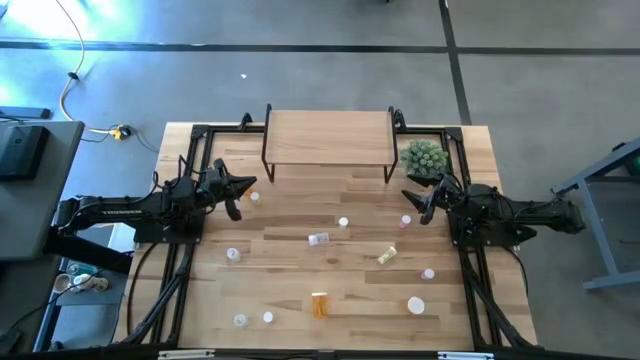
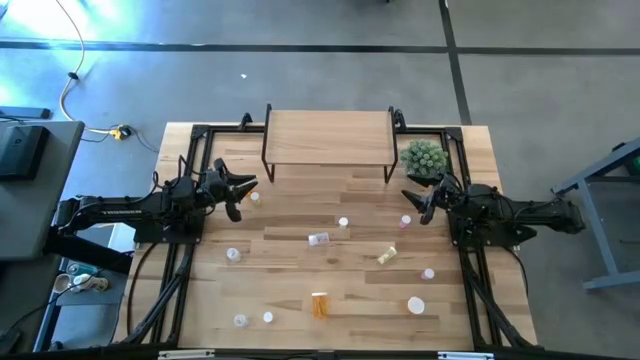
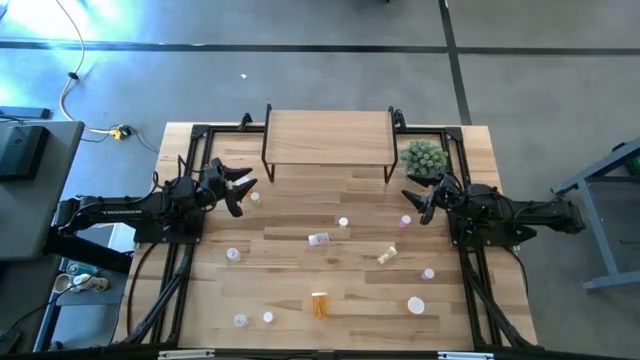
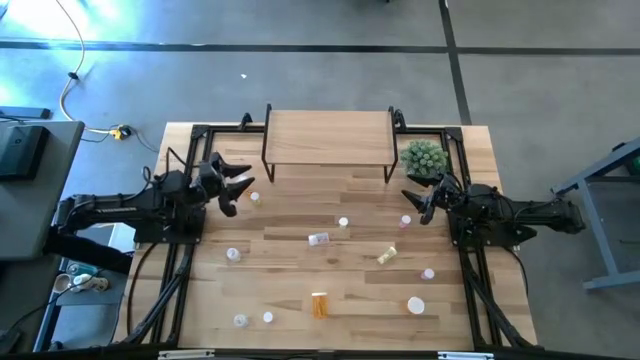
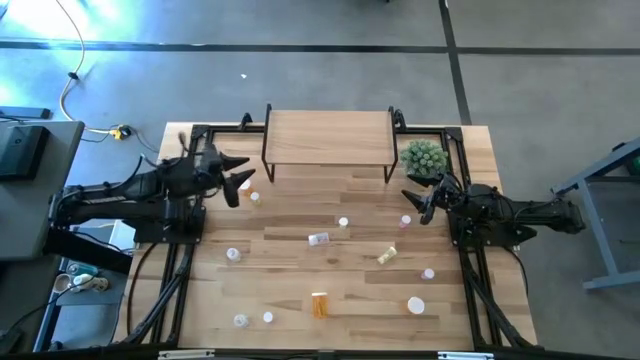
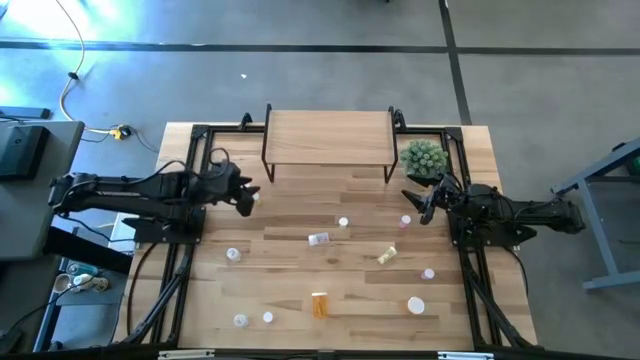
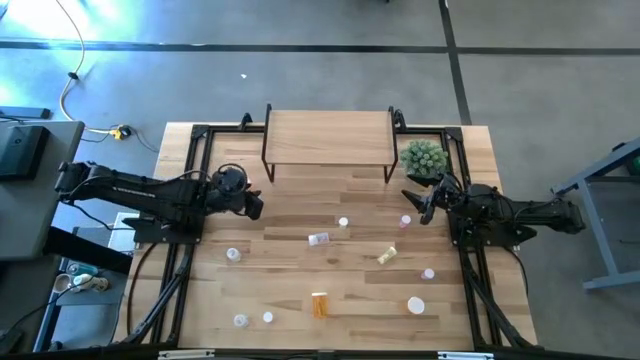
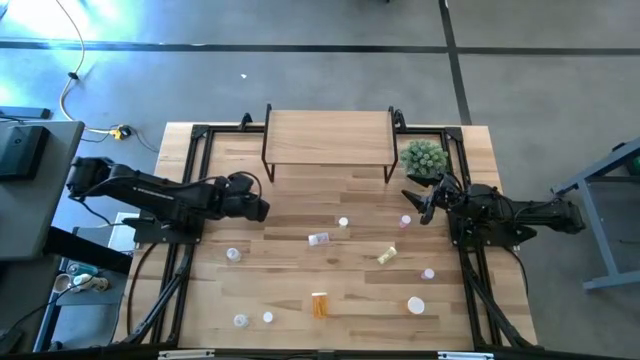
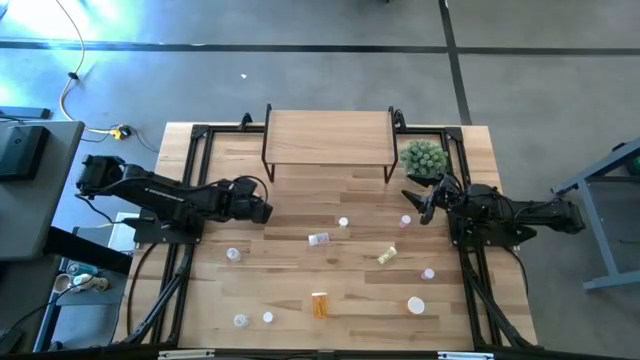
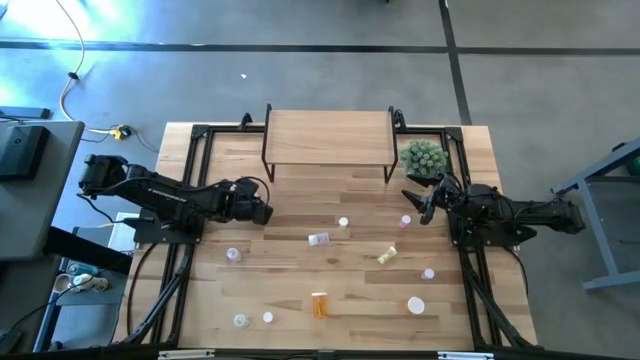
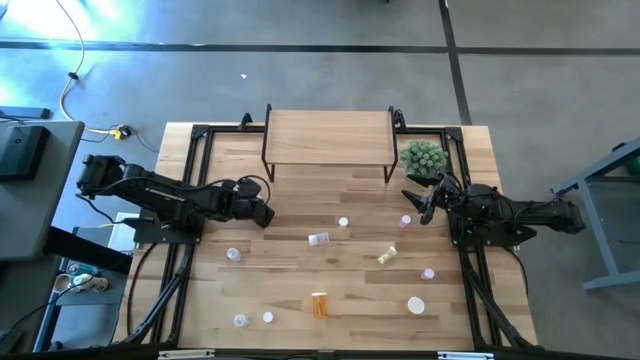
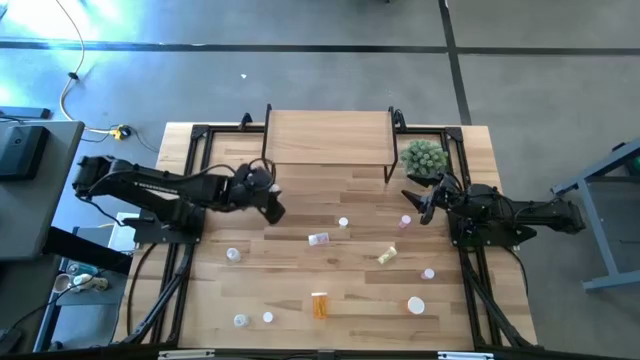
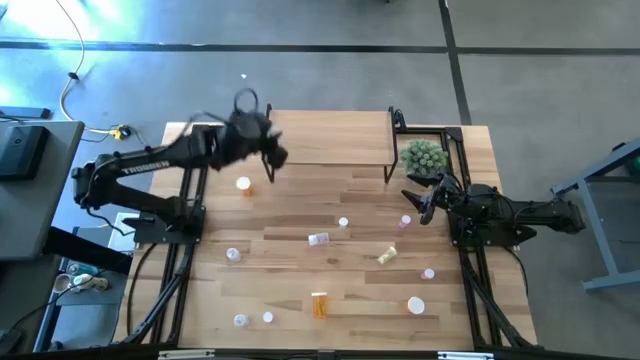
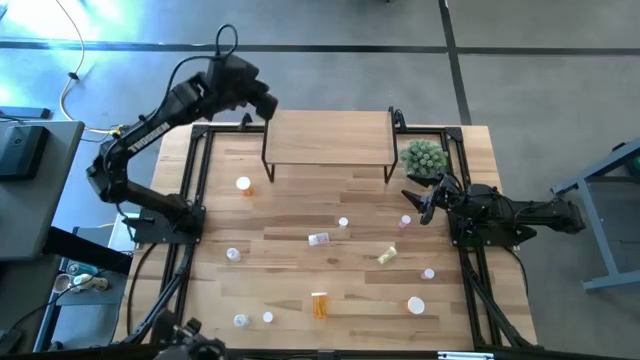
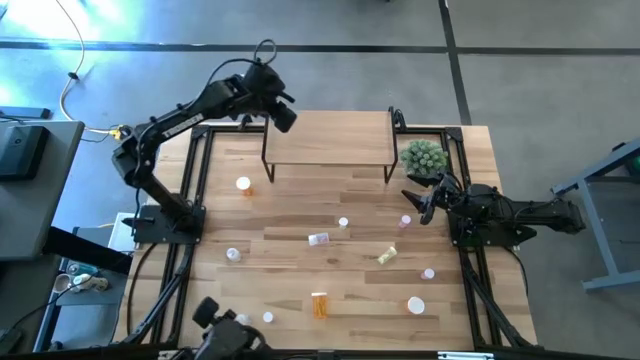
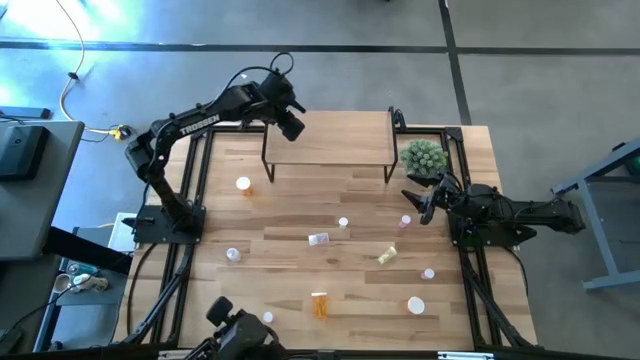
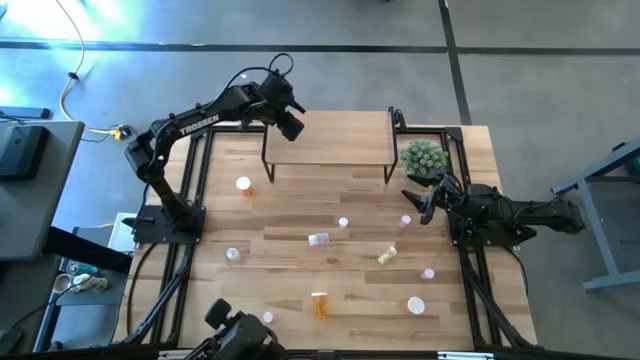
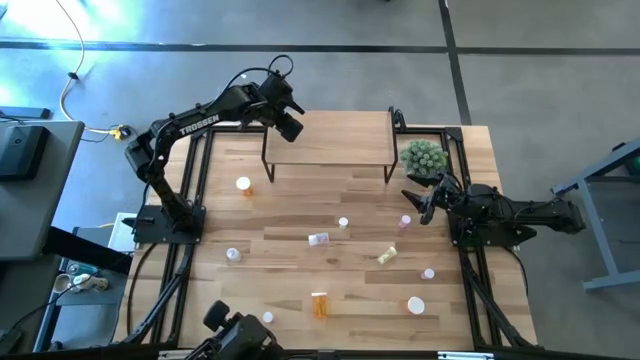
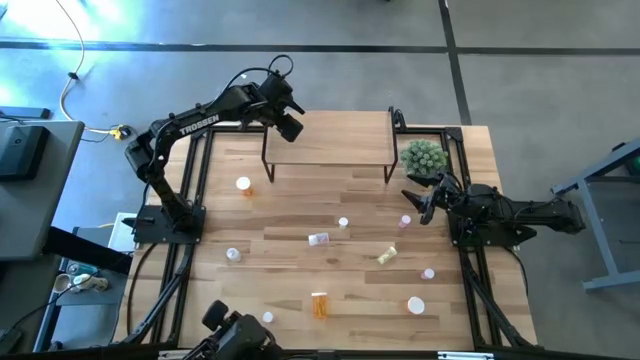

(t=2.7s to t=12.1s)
Task: Pick and place medicine bottles onto shelf by color
Put the top yellow pill bottle on the shelf

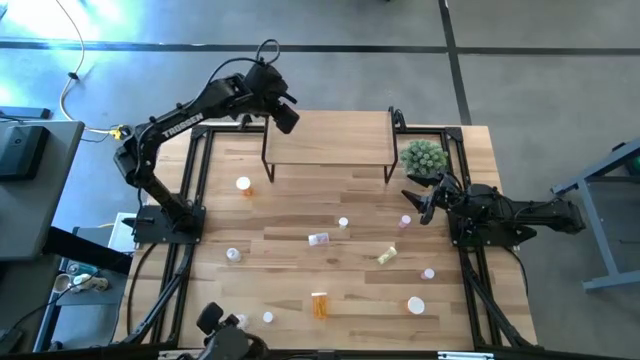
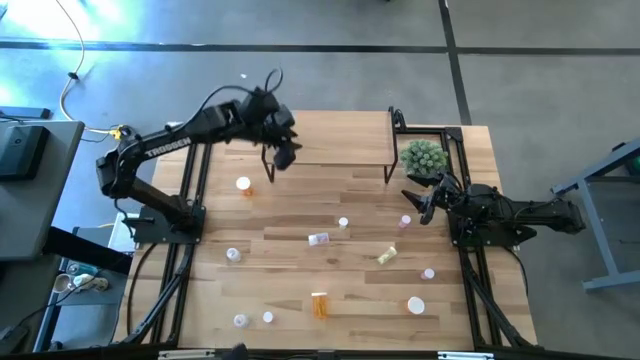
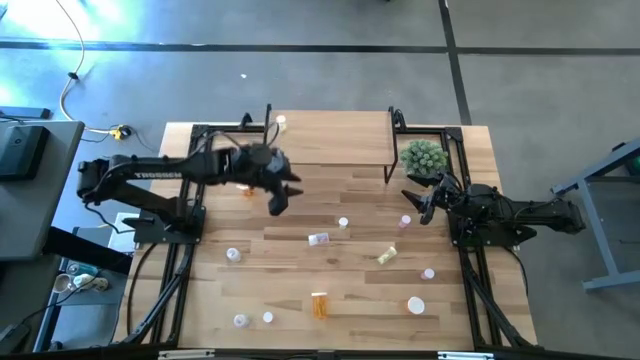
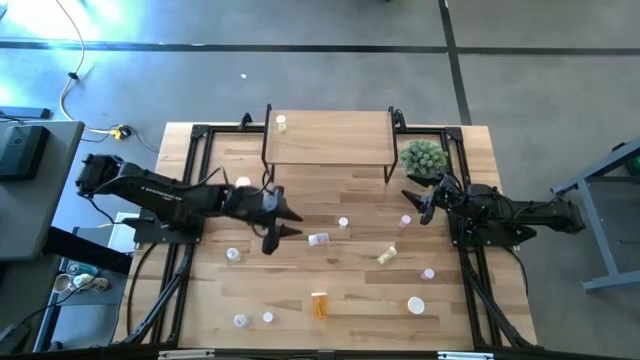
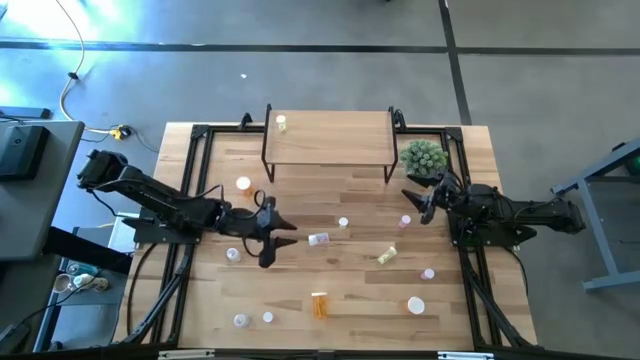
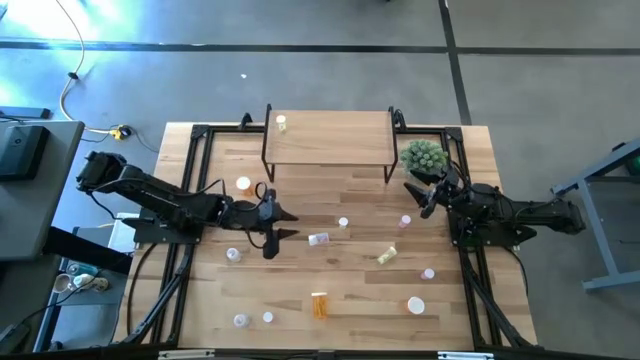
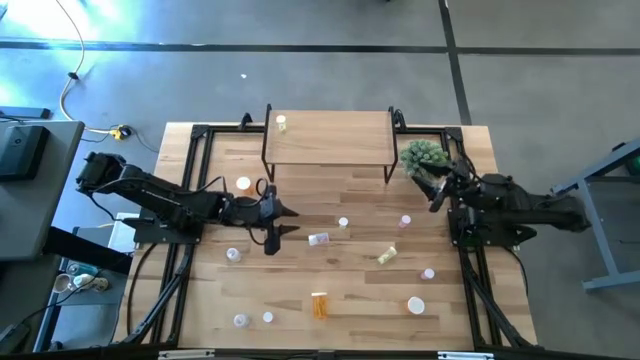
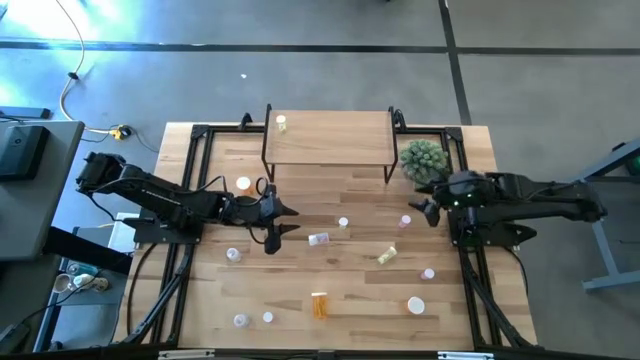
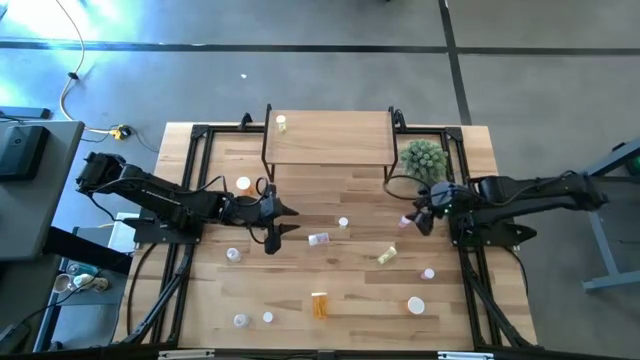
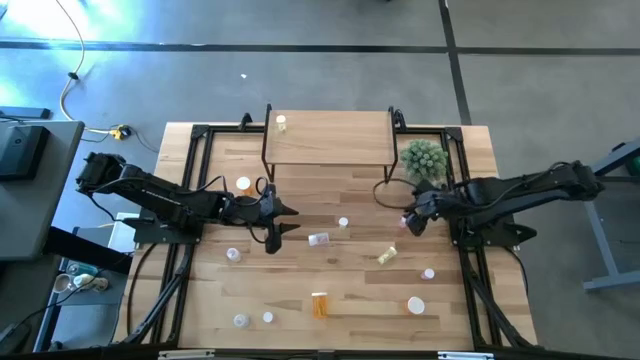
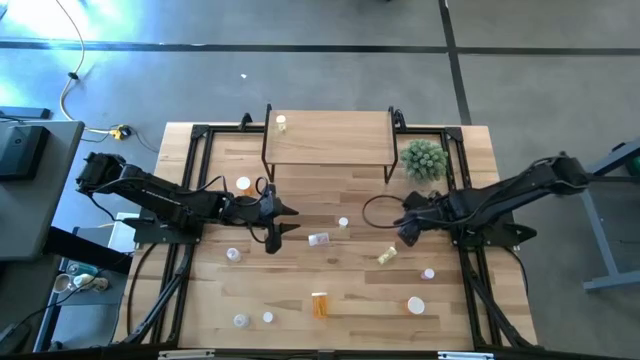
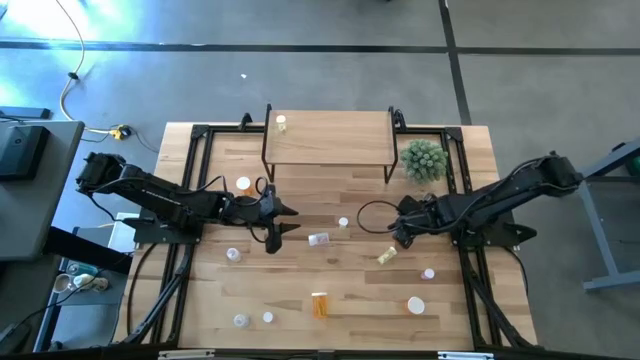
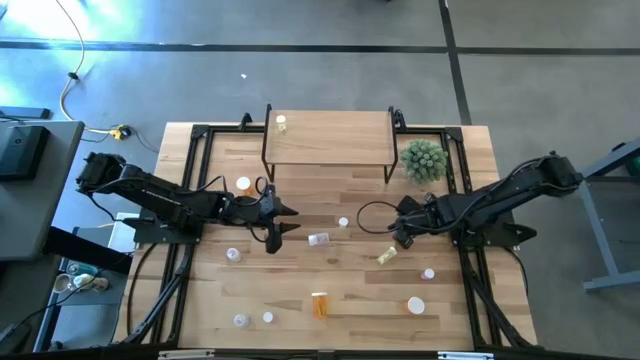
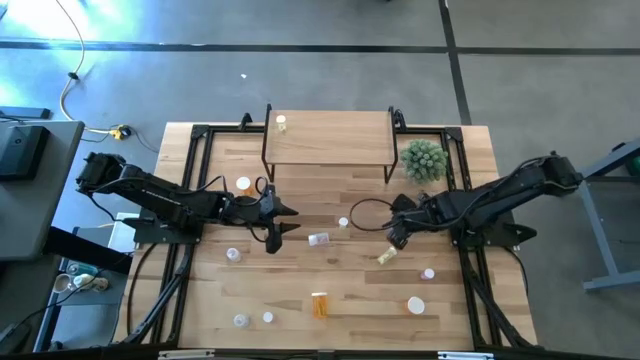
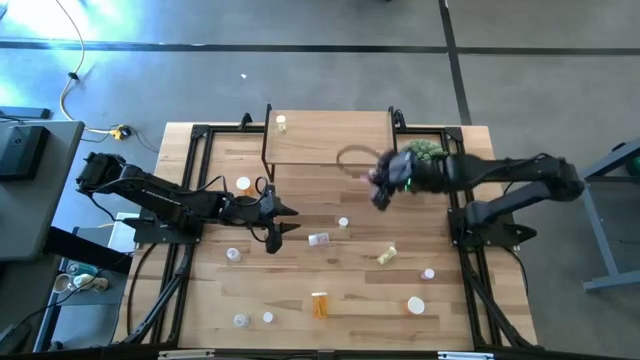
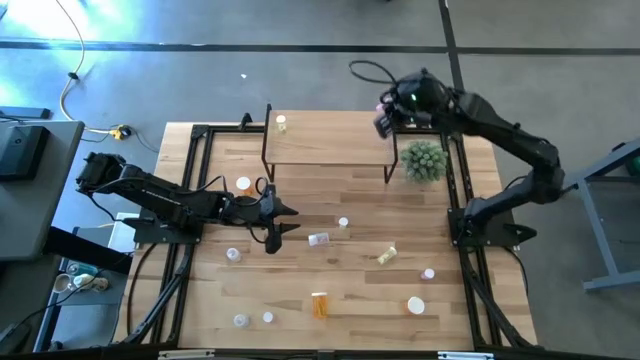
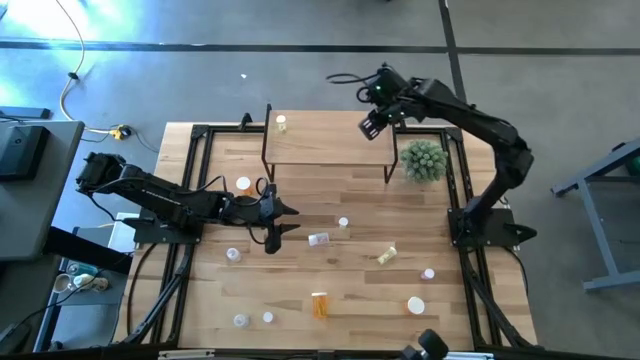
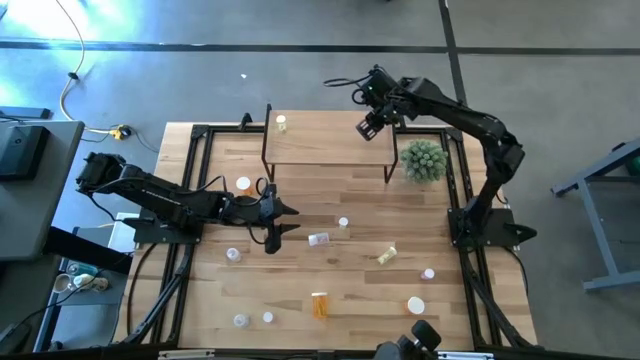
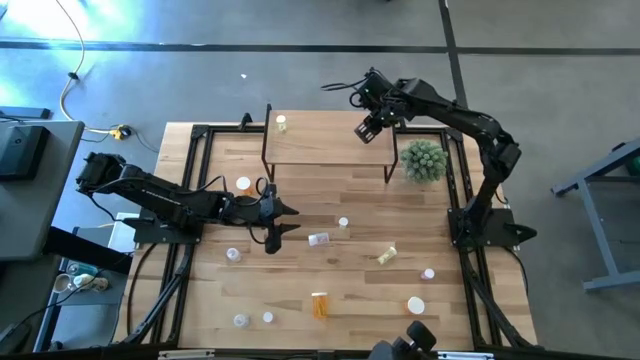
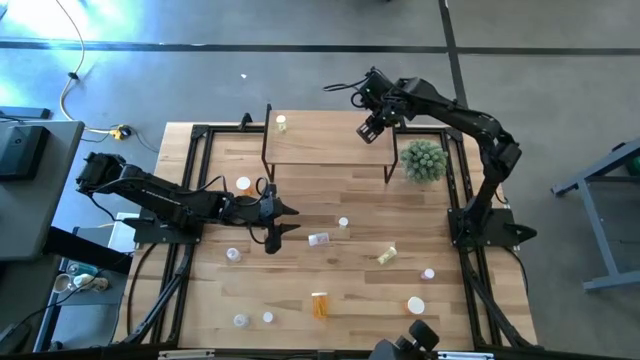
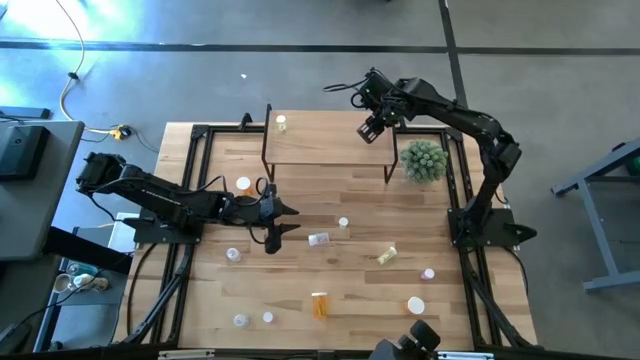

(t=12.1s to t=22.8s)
Put the top pink pill bottle on the shelf

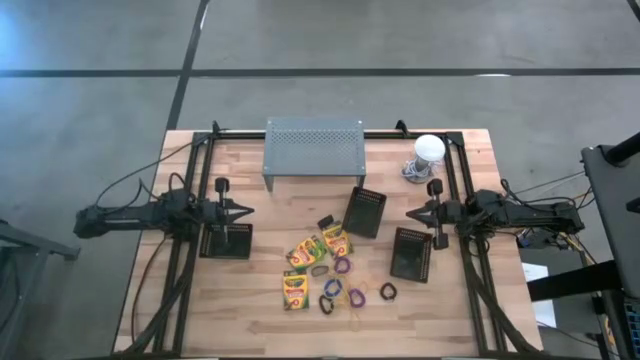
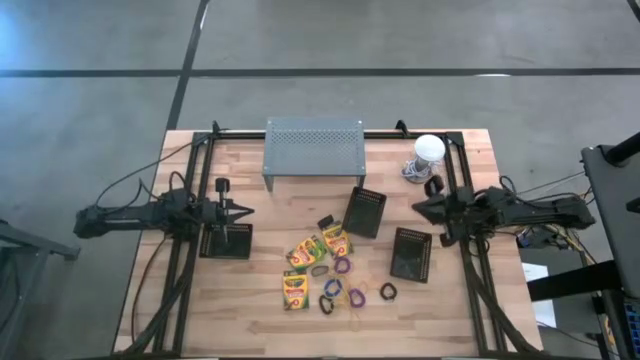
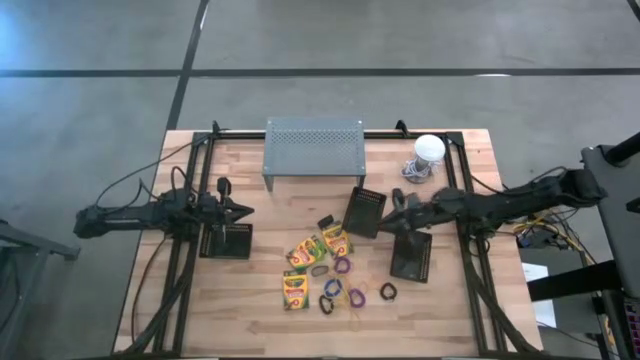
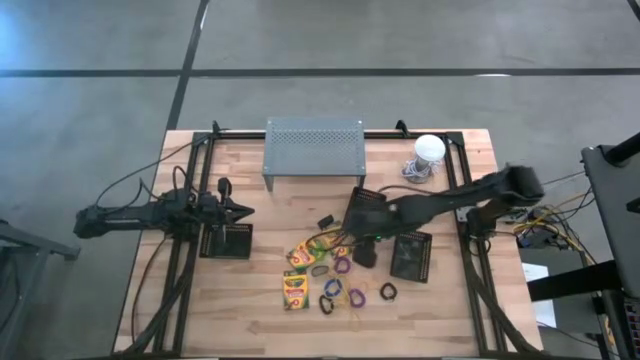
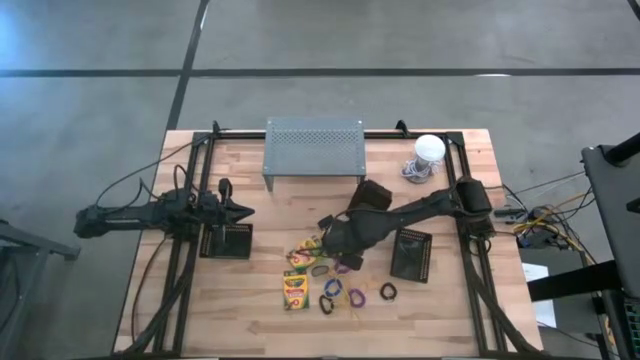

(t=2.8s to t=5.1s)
Task: Pick & Place Office Desk Supplies
Put the top black bin on the shelf
